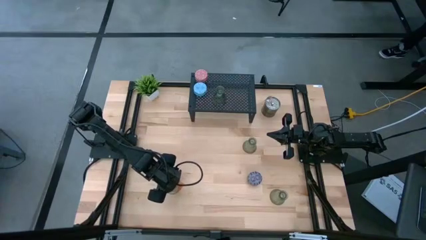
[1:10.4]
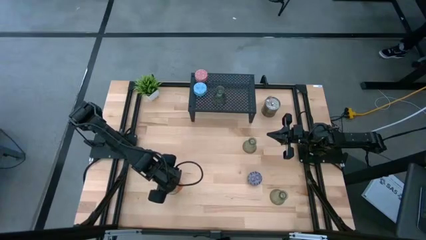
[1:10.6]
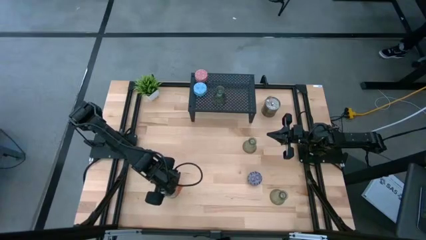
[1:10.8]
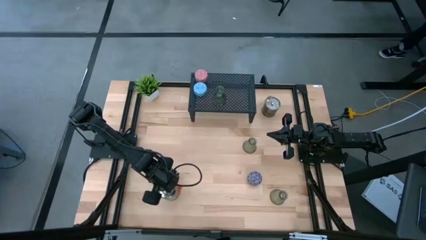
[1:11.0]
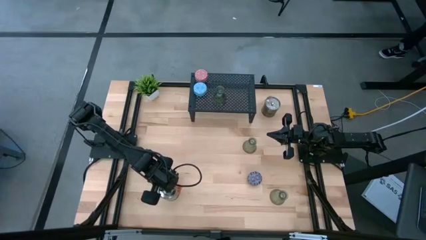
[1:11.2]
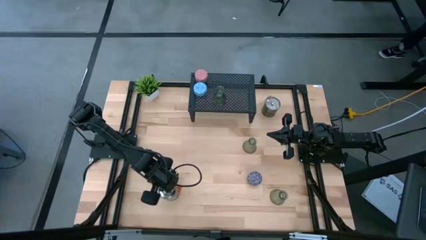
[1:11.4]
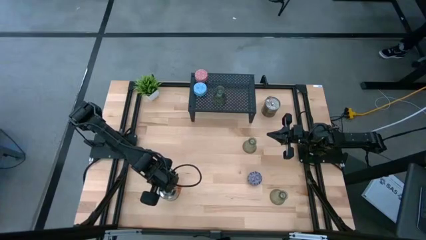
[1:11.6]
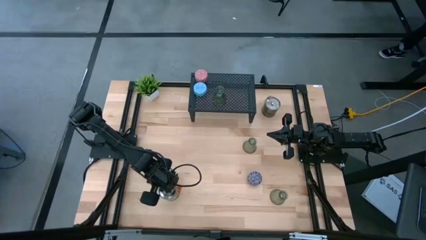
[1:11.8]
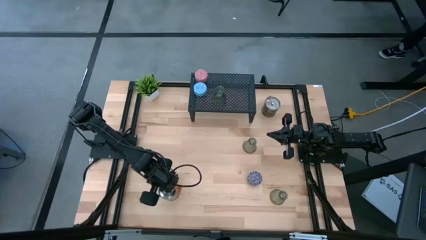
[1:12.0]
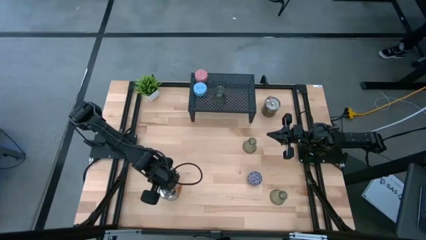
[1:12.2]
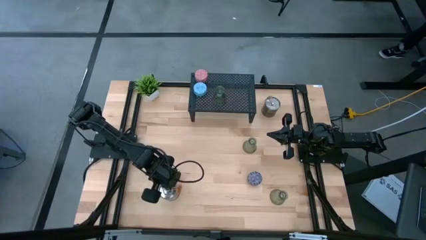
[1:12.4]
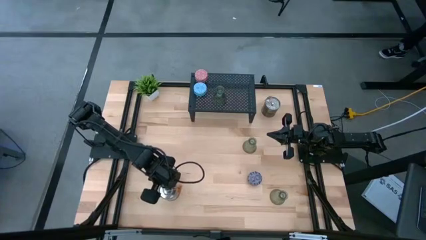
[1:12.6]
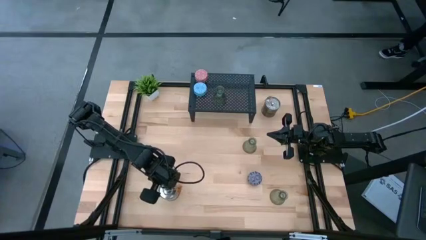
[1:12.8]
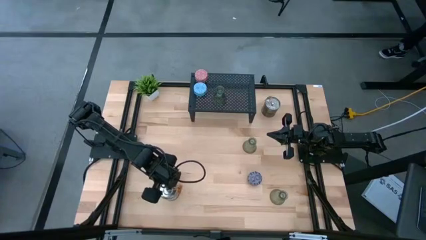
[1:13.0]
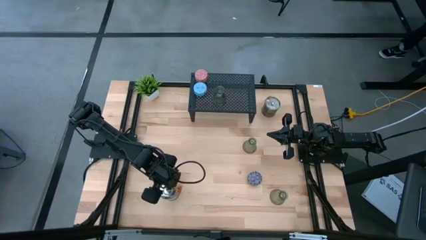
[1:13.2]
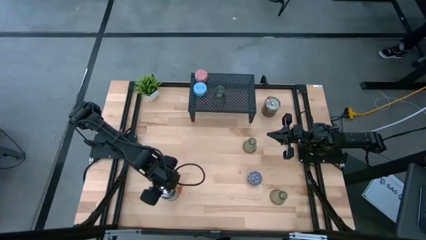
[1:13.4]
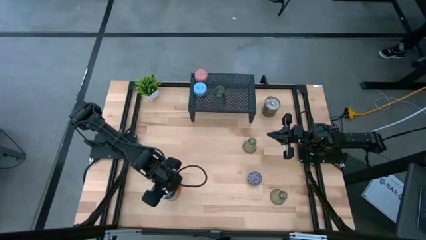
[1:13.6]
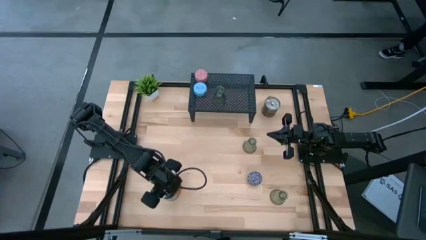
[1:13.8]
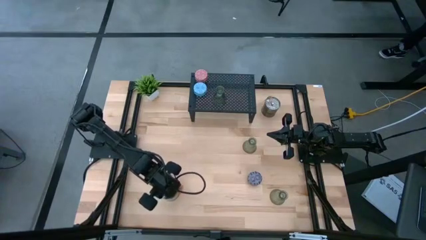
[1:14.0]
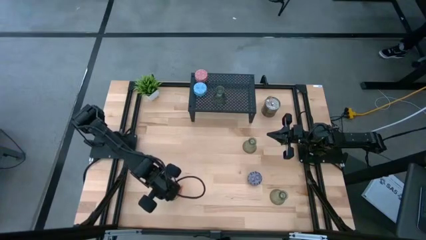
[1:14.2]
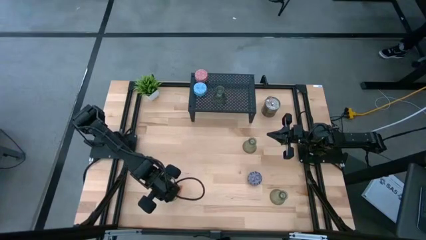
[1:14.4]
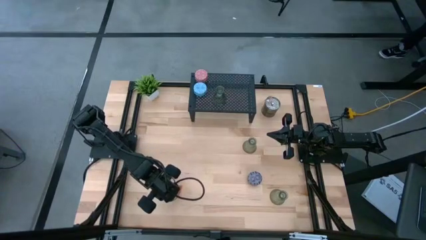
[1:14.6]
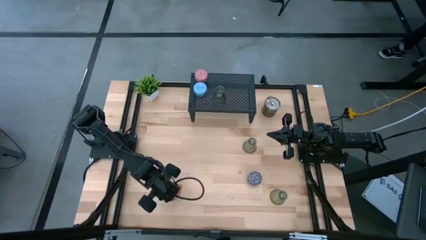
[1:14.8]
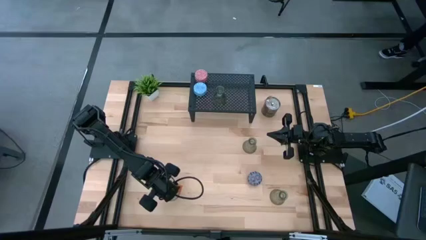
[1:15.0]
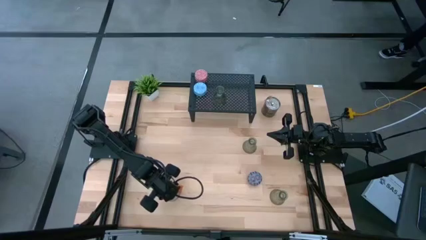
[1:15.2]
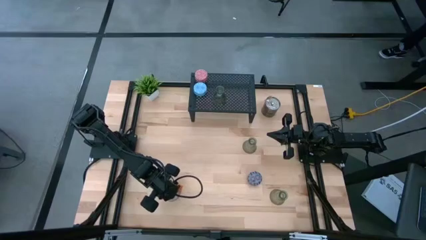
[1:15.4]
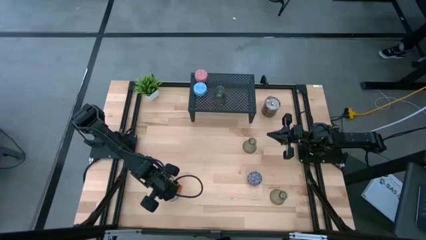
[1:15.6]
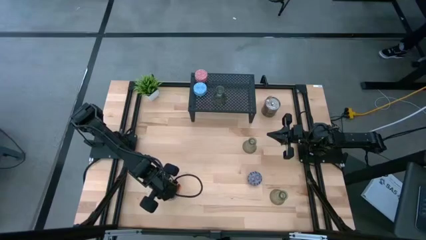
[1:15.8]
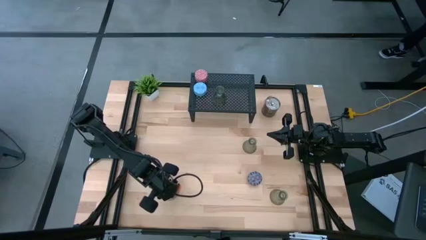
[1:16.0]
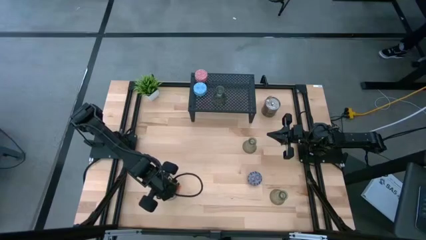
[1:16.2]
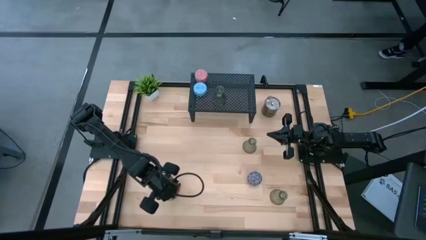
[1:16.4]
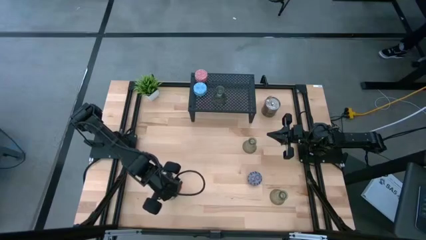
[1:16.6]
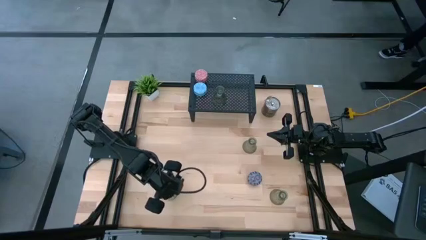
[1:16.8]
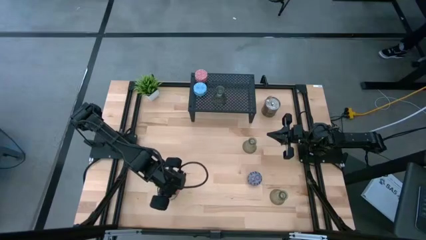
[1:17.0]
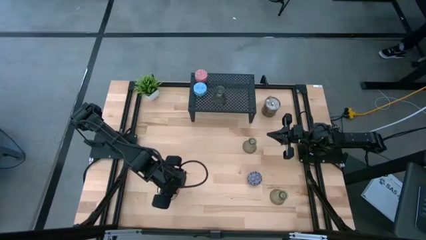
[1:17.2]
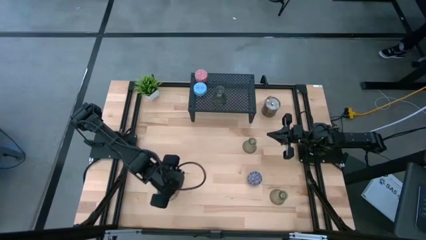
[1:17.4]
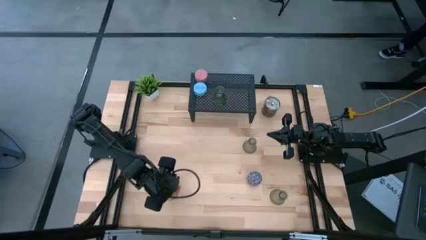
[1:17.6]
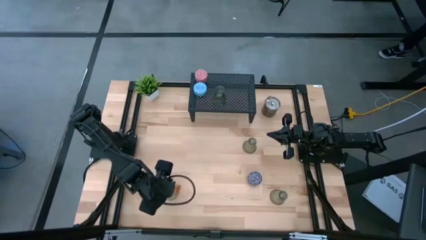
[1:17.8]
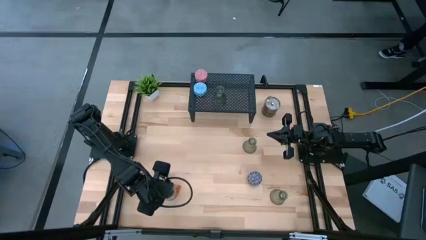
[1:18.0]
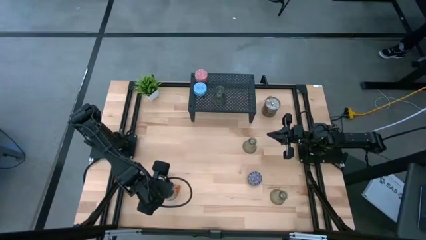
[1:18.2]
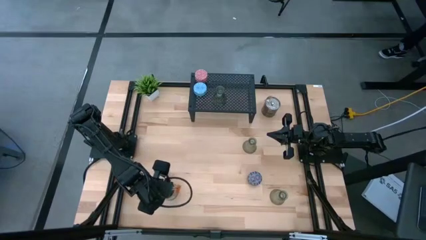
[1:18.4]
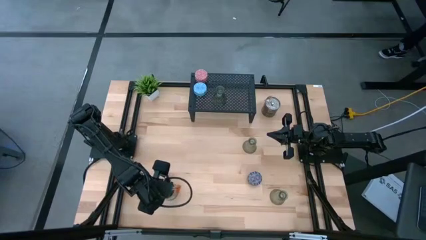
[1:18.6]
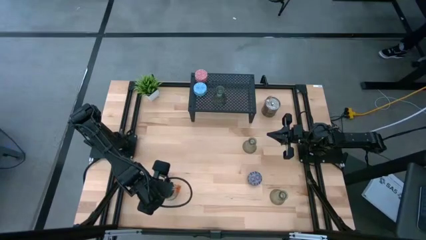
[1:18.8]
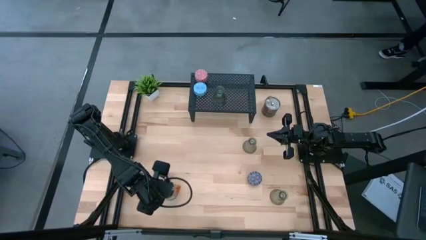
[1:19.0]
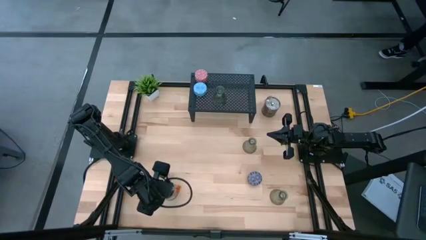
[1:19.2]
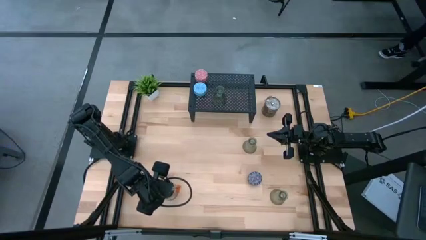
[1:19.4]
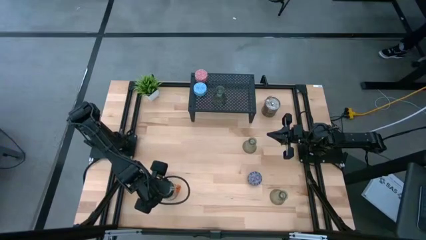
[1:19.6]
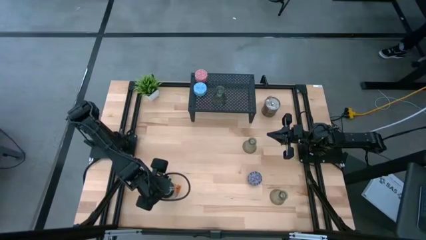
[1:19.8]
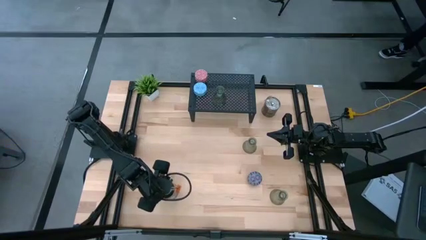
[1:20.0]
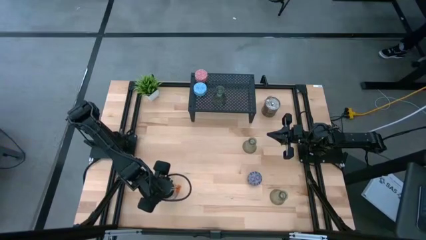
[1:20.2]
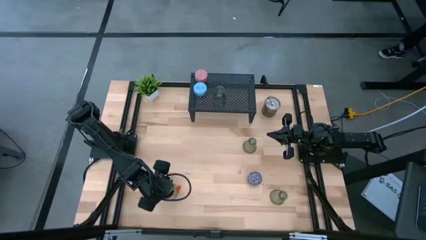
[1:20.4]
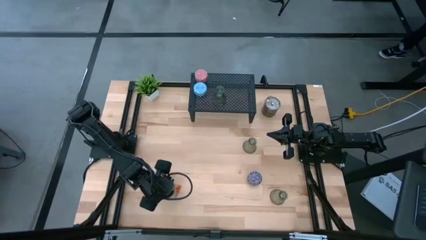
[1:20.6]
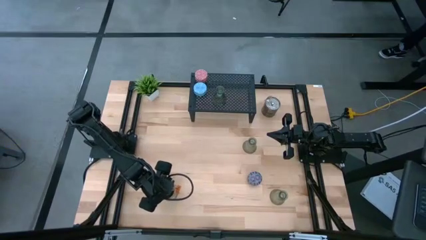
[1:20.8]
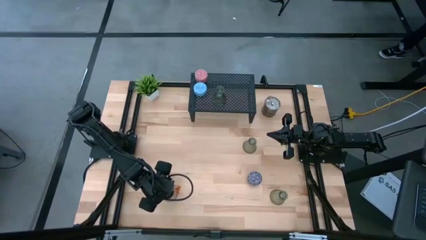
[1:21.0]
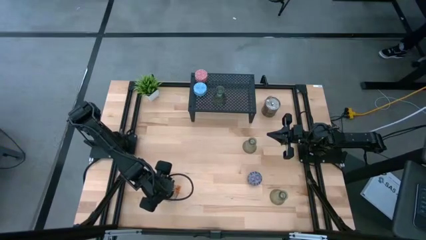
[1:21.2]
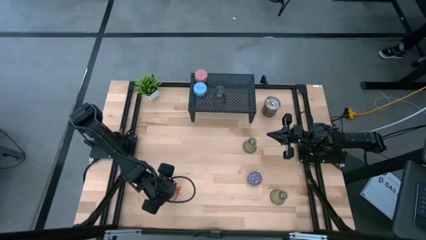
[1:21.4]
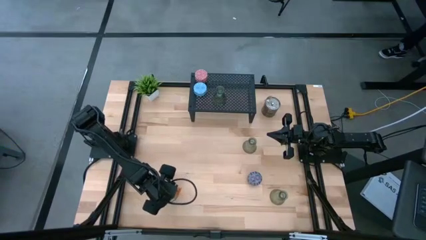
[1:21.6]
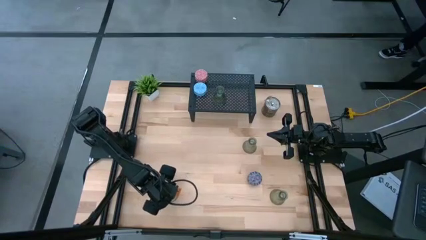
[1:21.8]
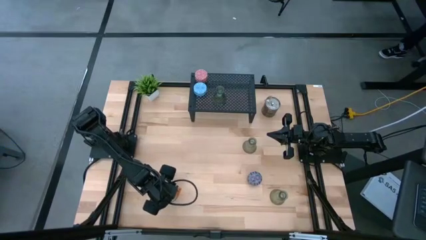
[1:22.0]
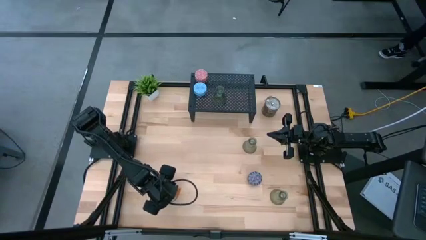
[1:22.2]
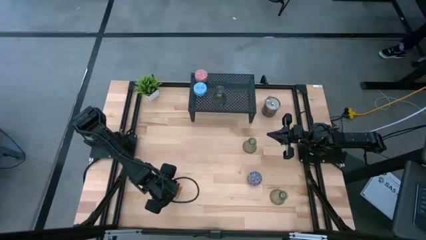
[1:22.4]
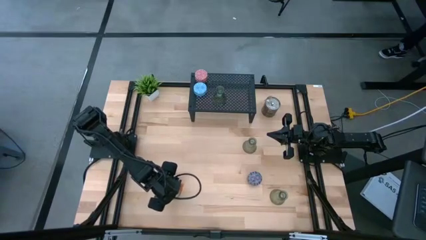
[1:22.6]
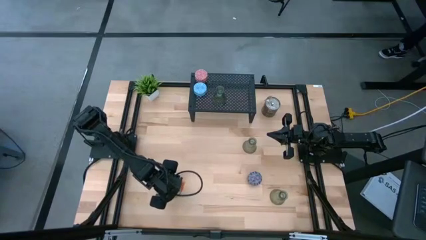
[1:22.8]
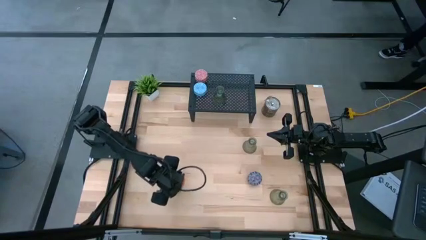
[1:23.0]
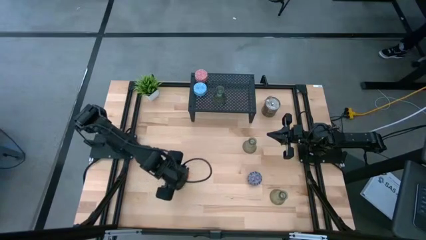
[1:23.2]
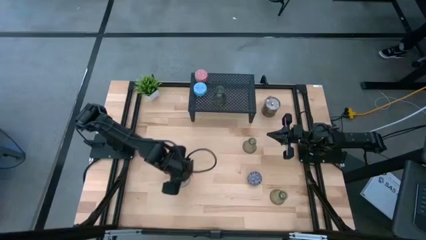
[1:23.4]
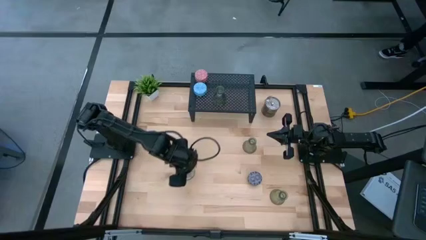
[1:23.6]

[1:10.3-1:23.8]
Task: Pick & Place candle stick holders
Put the bottom silver scented candle on the shelf
